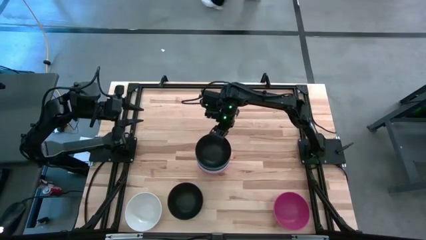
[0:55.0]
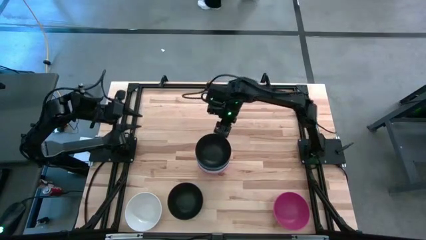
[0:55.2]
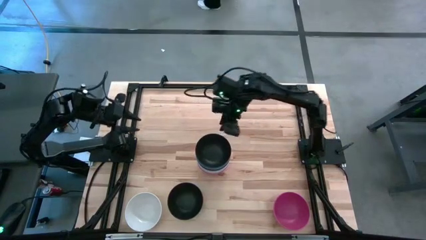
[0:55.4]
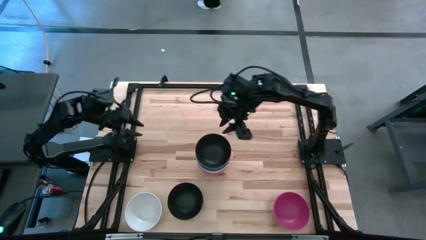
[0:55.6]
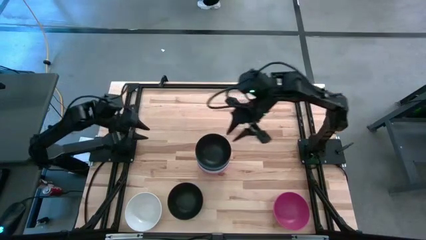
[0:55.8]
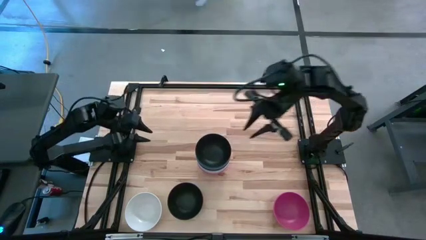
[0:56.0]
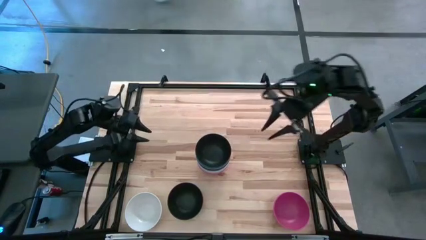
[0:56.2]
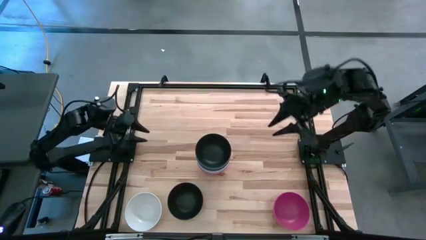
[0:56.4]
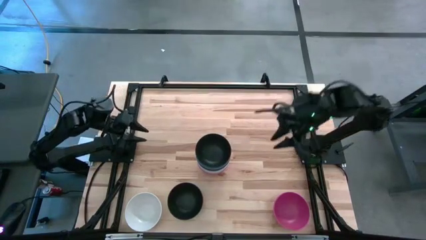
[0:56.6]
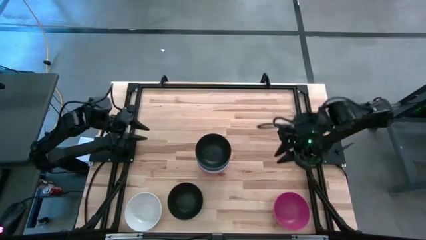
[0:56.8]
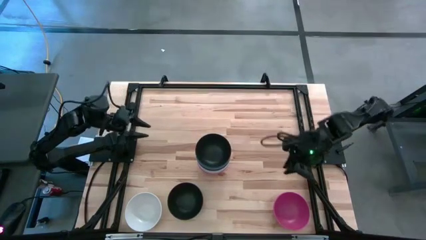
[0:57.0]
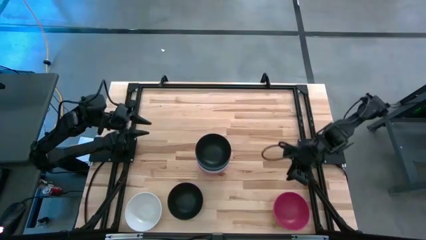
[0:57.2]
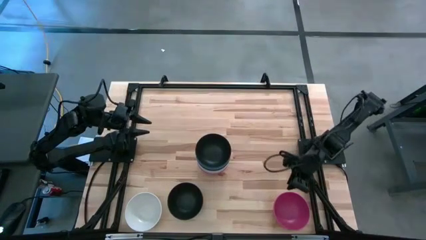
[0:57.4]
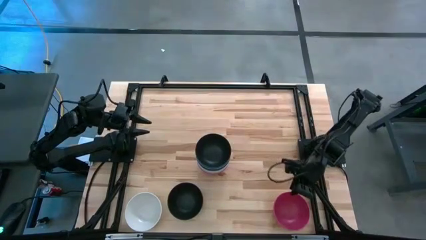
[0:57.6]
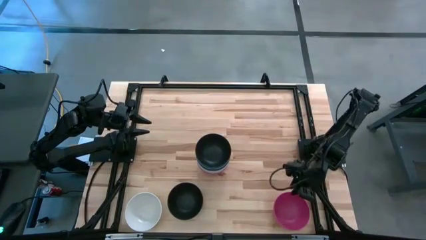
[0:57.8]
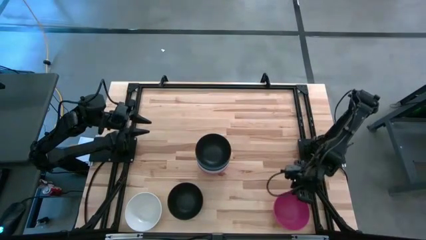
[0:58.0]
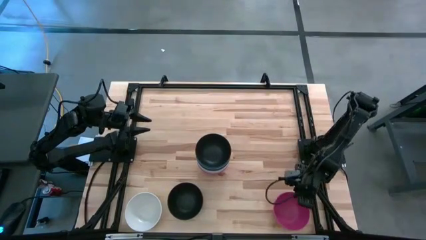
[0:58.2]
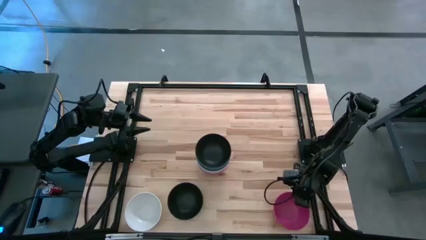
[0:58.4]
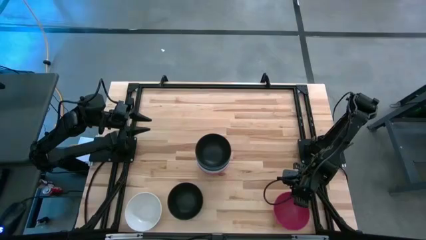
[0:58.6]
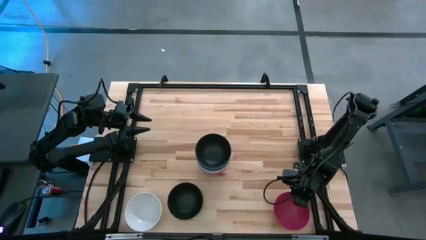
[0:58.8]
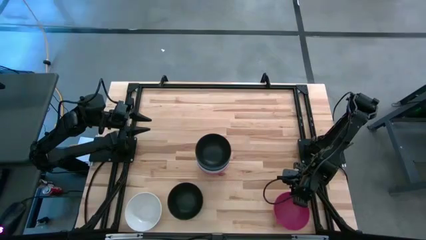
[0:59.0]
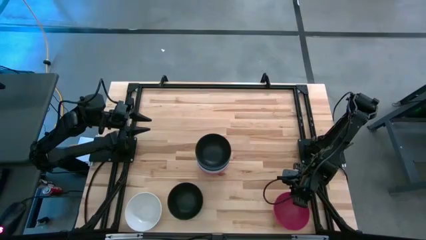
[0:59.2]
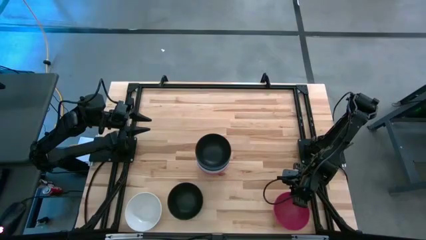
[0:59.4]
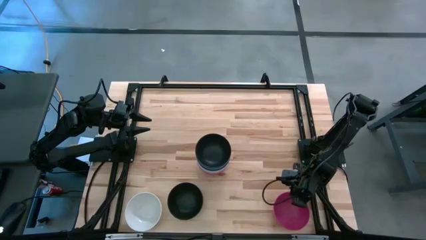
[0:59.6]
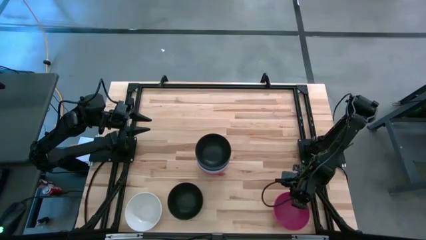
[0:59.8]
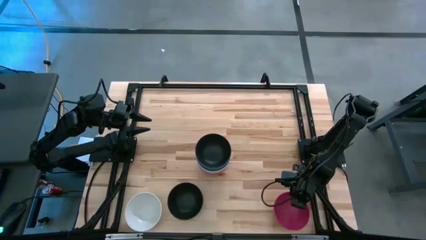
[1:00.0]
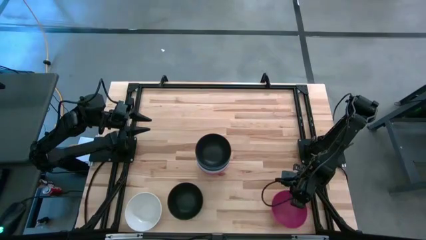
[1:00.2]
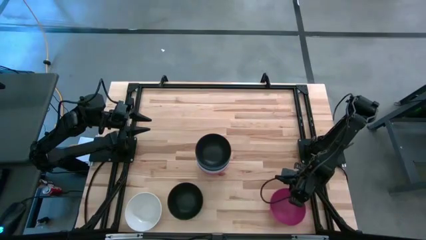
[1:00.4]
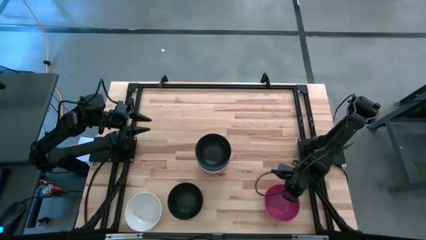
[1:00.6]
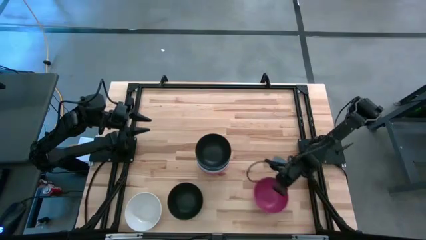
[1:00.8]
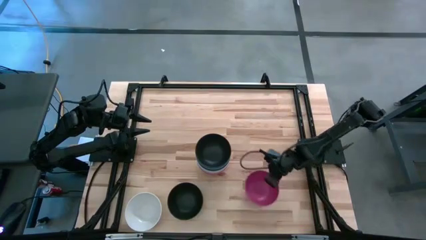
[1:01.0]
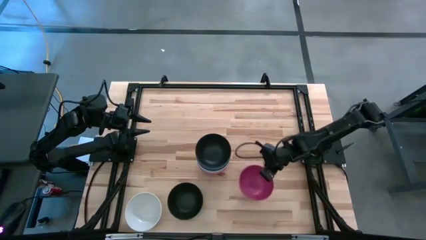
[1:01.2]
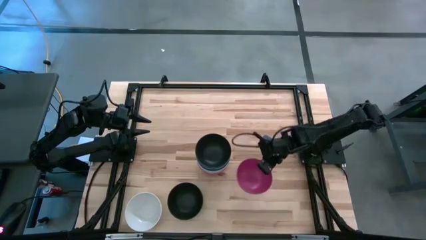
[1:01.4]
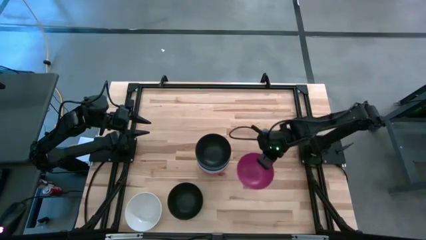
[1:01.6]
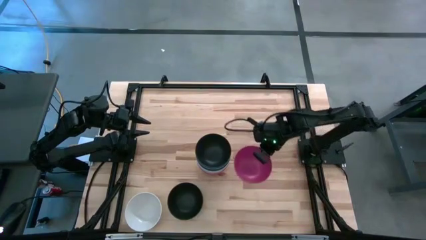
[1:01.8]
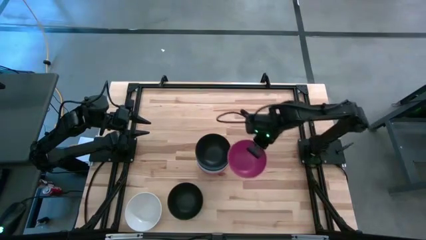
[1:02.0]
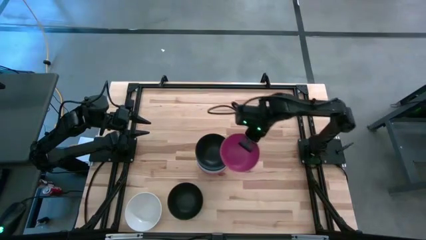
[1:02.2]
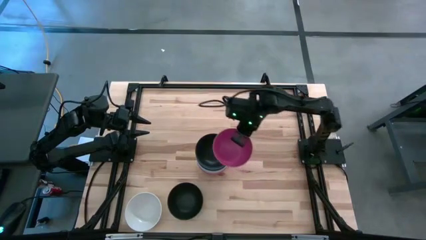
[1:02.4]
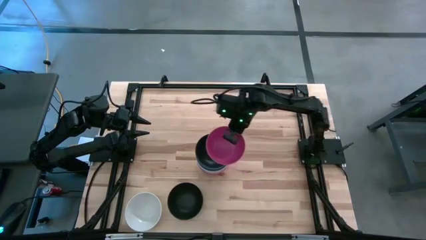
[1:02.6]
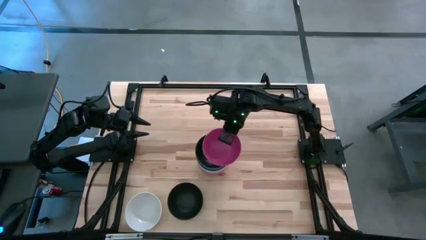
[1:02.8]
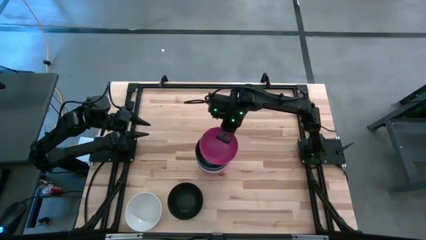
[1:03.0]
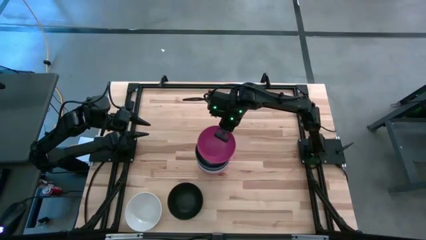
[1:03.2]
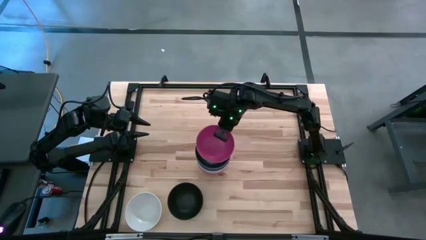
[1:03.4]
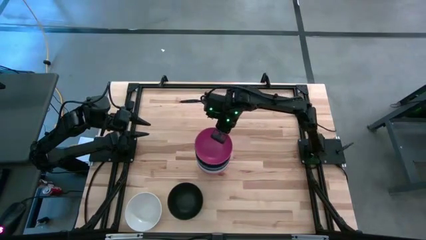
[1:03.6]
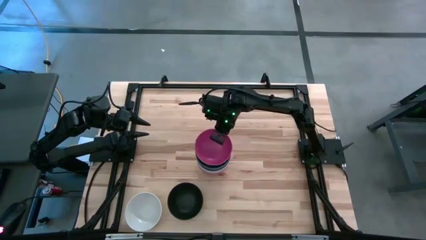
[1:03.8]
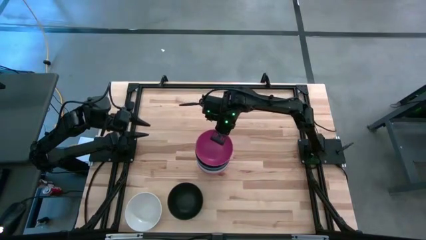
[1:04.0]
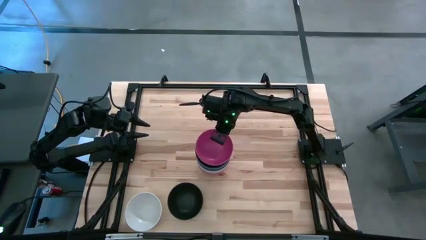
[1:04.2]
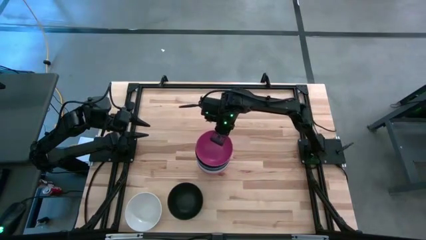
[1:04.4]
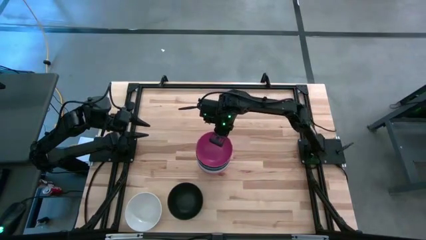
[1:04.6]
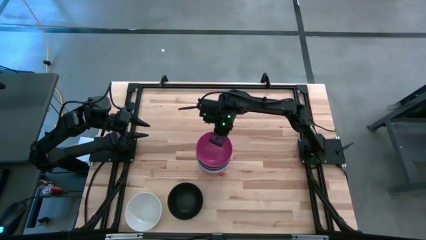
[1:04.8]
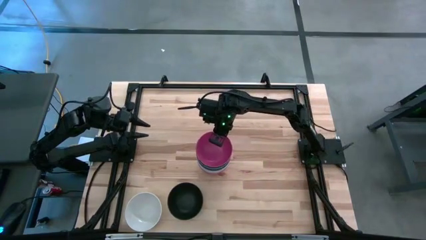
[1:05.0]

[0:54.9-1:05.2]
Task: Nest bowls inside each other
Stack the pink bowl on the black bowl

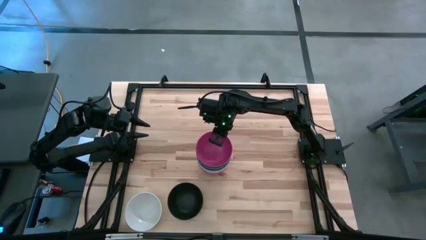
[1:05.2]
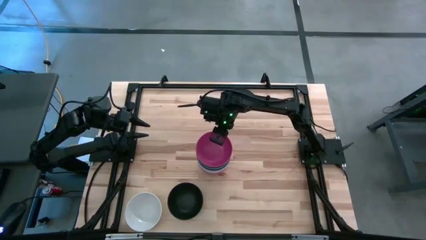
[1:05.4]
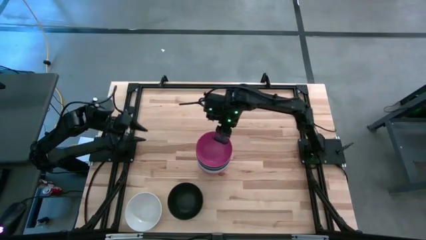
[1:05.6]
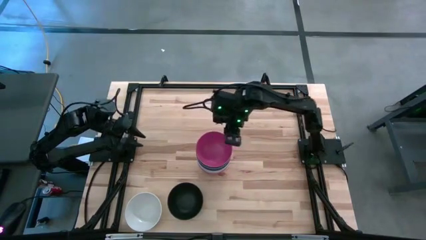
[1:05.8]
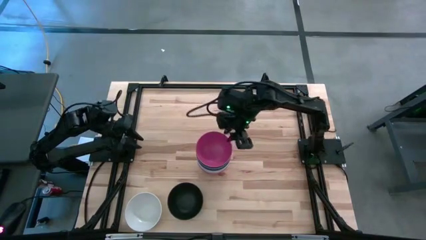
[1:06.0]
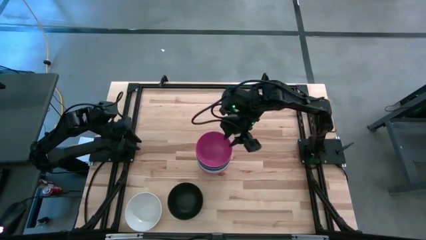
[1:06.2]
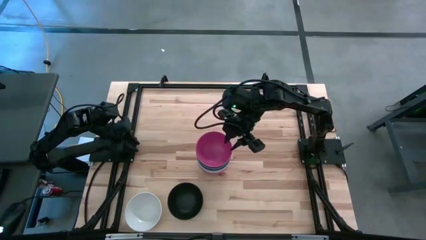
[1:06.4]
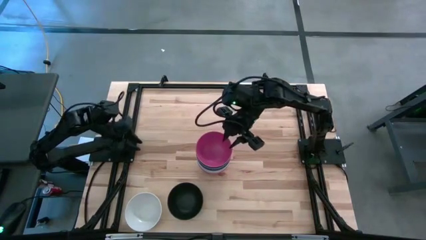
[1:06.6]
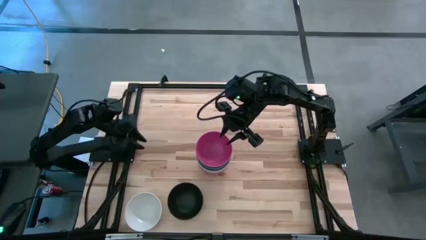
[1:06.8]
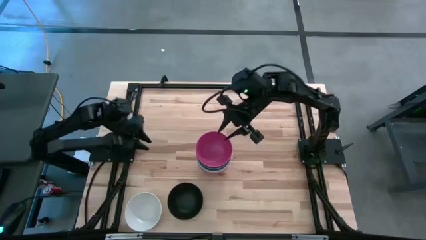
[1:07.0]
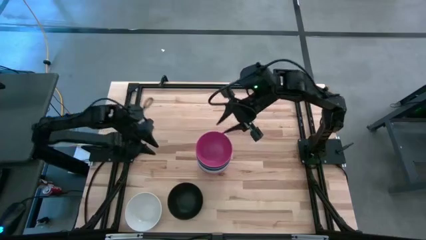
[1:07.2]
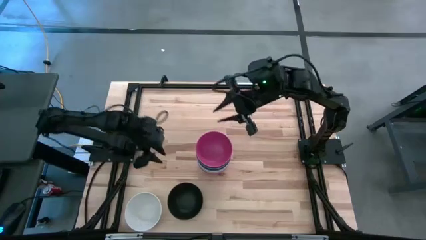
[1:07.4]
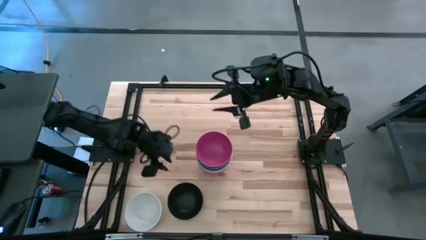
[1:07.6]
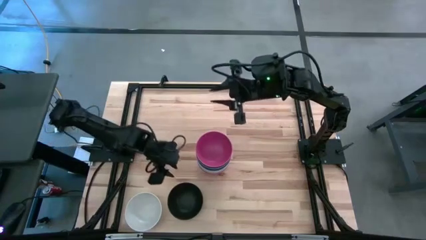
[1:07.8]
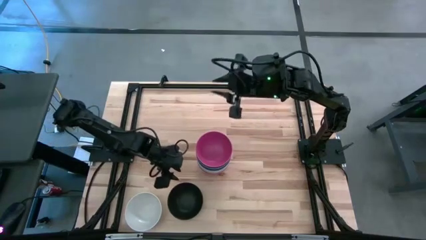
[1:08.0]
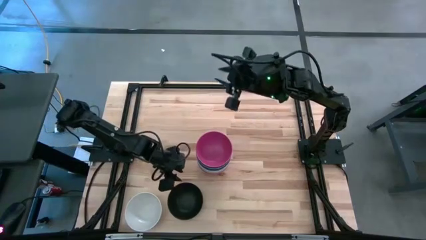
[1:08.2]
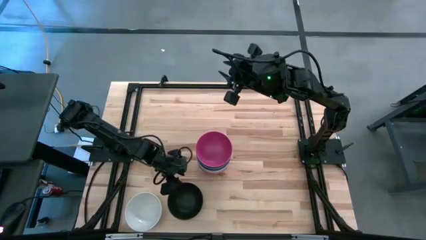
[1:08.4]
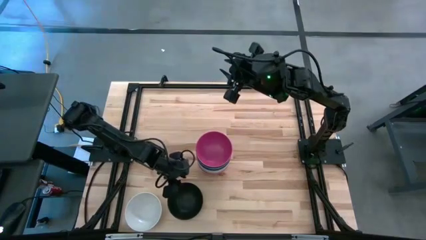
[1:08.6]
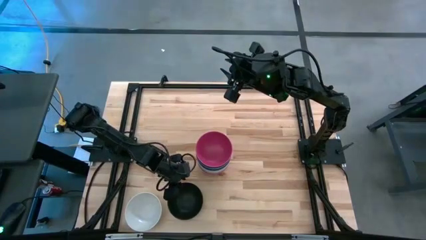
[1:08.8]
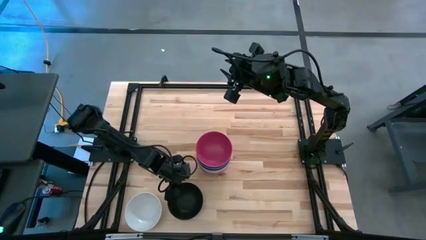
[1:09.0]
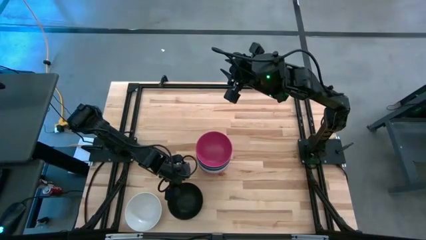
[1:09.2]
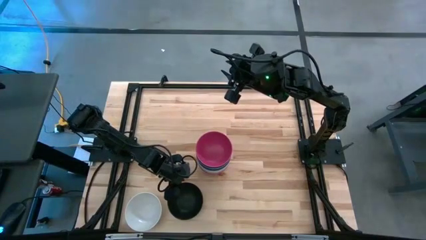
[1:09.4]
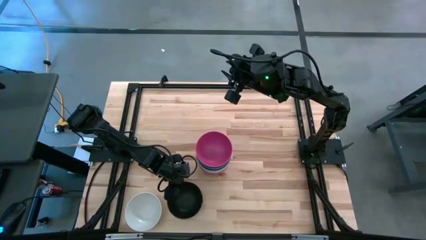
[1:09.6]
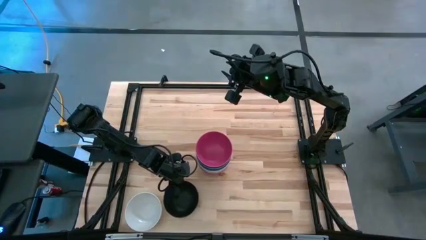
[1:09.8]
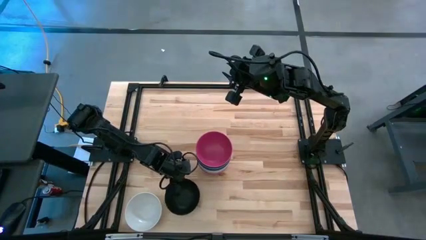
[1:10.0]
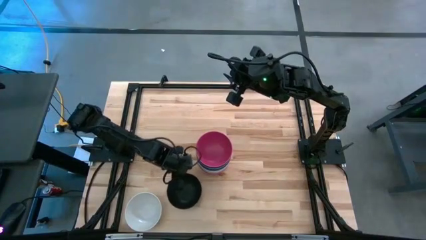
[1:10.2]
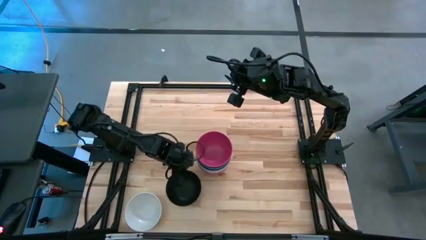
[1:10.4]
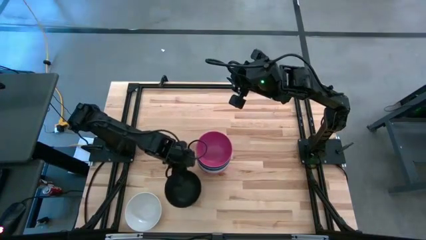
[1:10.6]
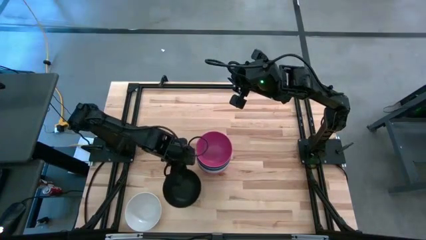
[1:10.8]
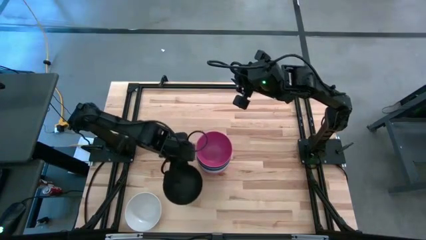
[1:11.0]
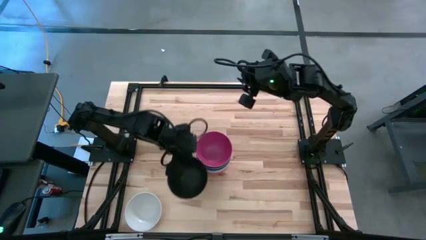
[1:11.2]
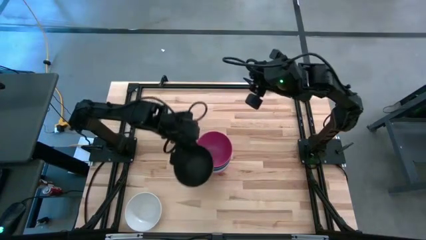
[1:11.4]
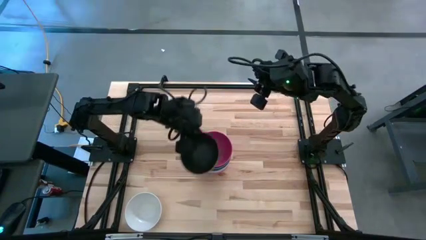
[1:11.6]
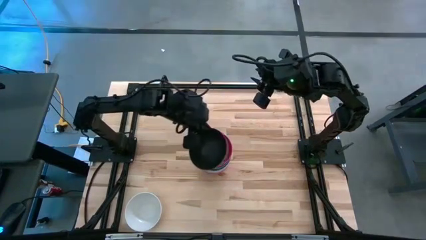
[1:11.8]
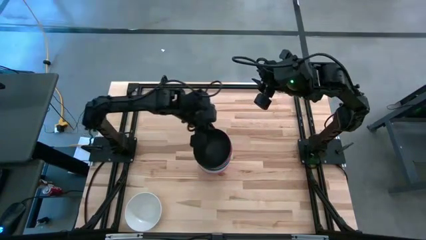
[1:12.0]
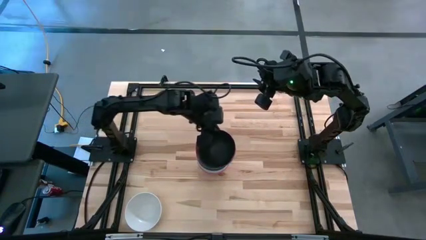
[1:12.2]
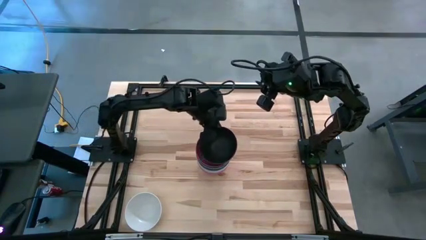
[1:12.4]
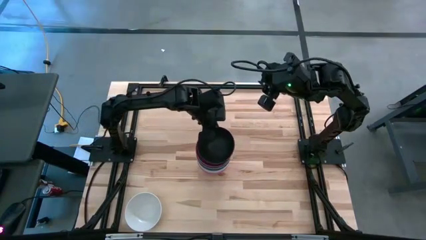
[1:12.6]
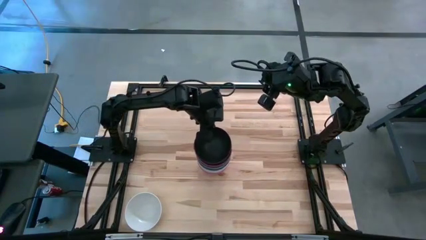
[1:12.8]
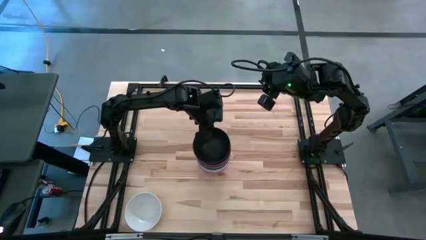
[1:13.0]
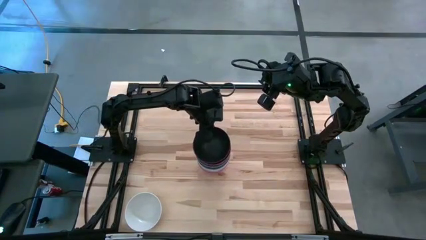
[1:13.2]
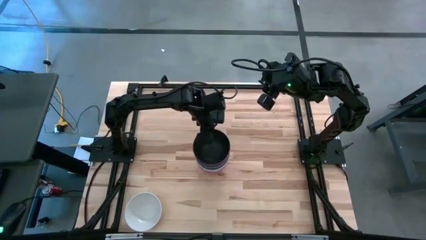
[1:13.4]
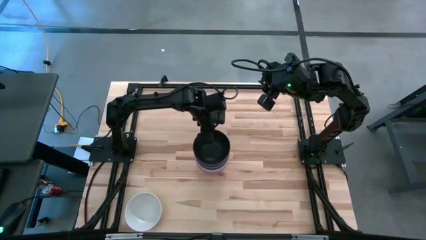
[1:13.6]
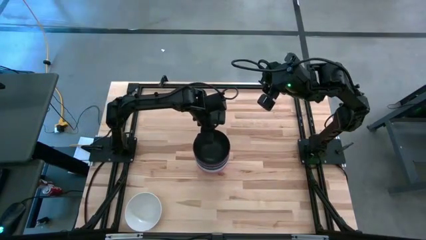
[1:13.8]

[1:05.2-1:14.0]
Stack the black bowl on the pink bowl
